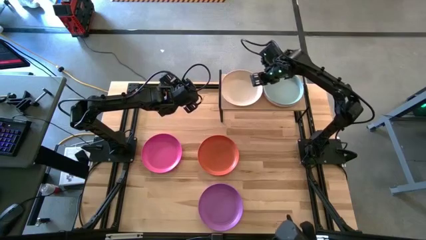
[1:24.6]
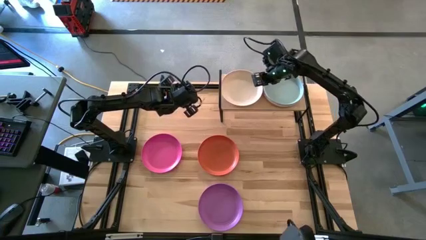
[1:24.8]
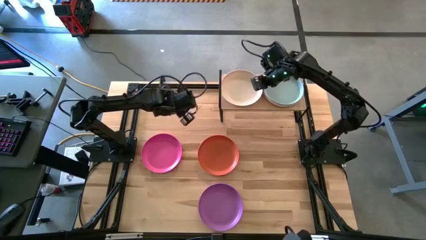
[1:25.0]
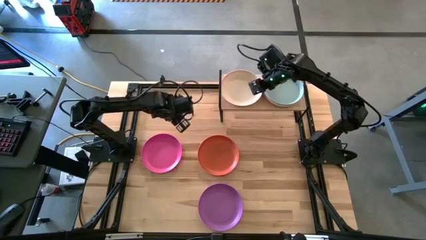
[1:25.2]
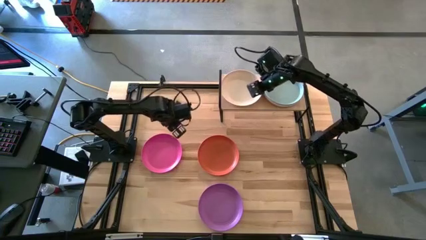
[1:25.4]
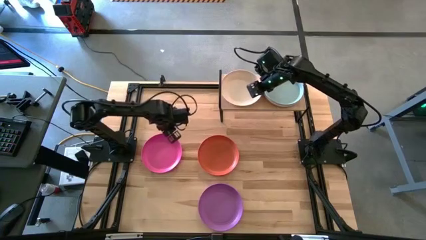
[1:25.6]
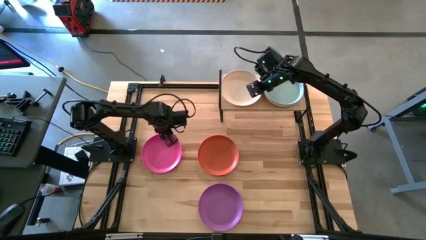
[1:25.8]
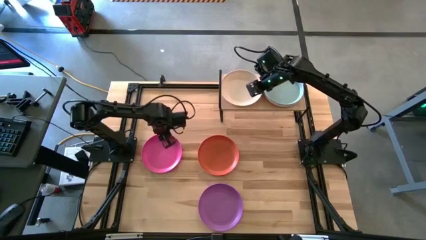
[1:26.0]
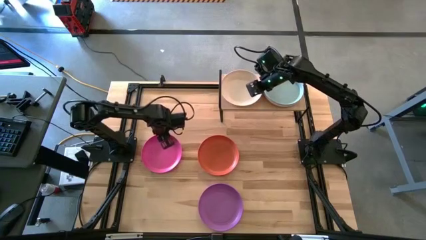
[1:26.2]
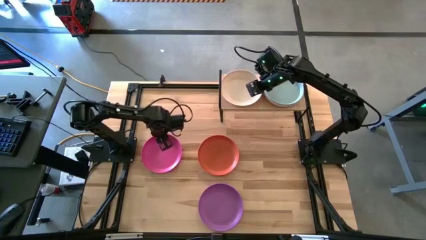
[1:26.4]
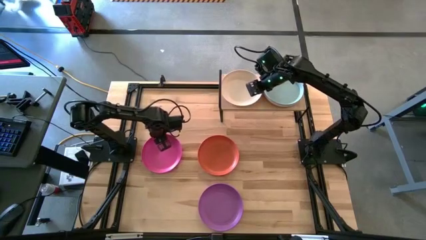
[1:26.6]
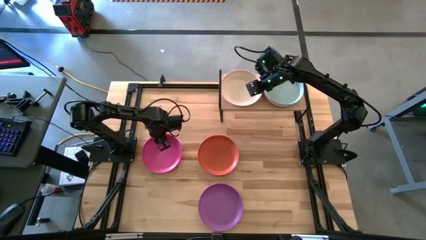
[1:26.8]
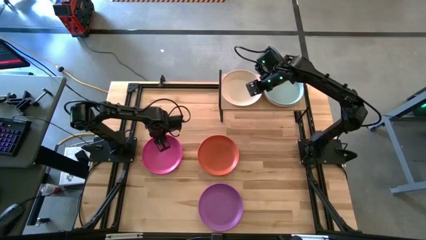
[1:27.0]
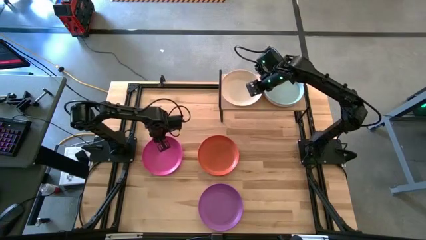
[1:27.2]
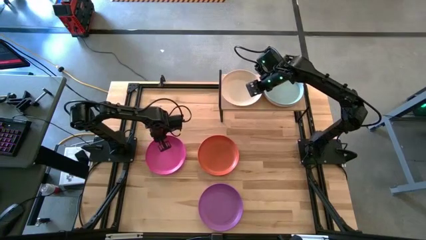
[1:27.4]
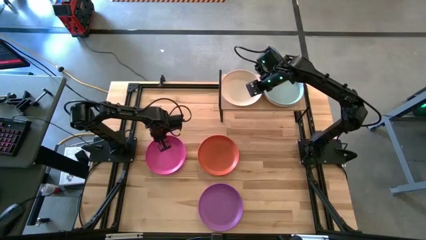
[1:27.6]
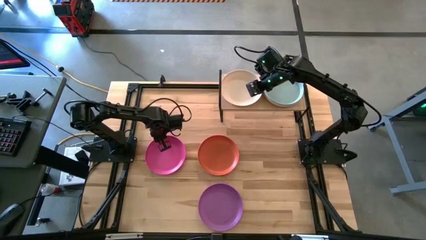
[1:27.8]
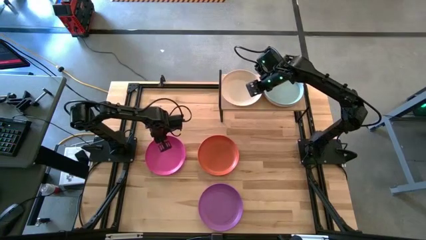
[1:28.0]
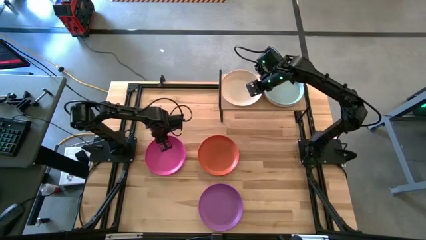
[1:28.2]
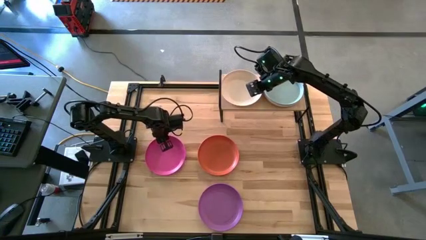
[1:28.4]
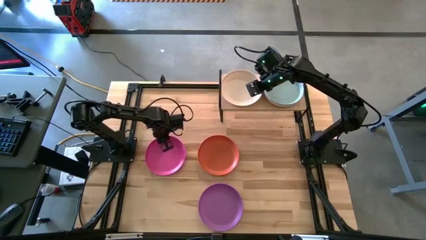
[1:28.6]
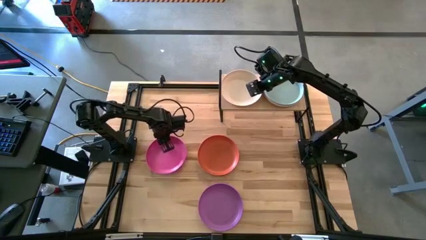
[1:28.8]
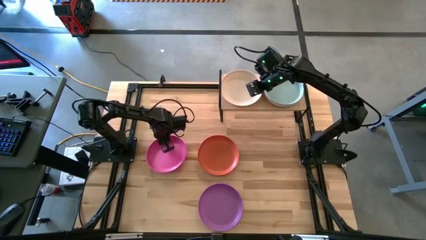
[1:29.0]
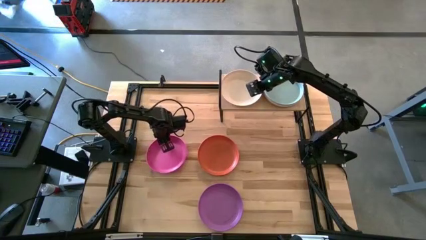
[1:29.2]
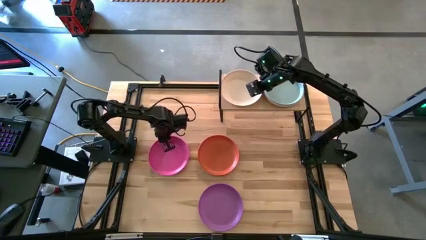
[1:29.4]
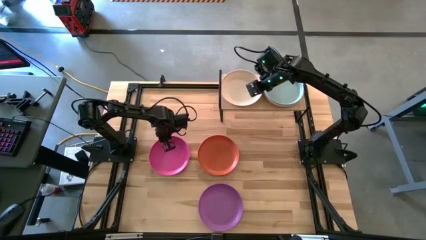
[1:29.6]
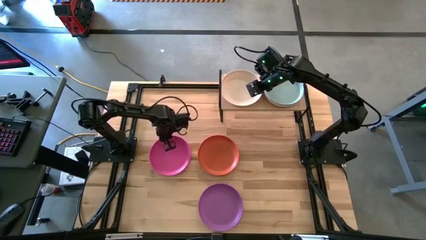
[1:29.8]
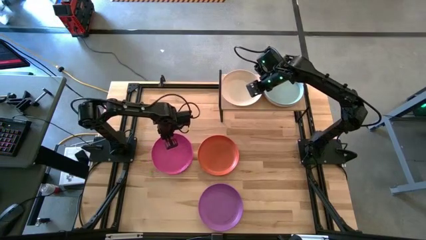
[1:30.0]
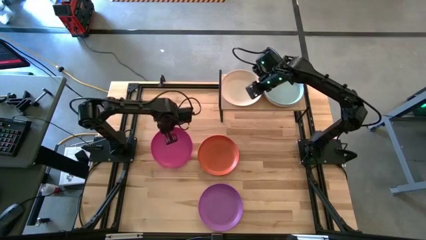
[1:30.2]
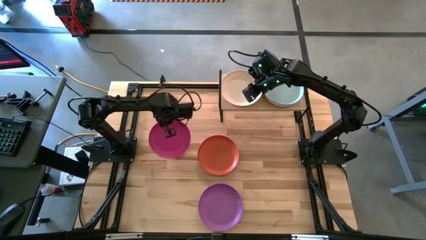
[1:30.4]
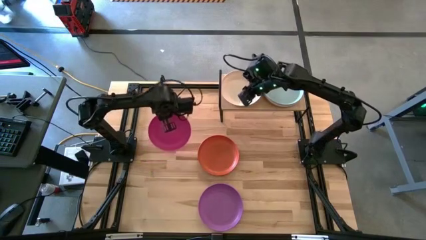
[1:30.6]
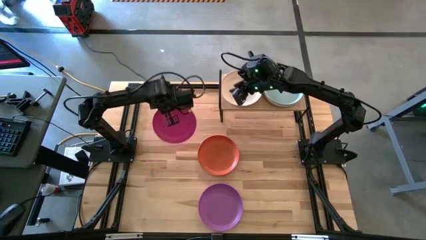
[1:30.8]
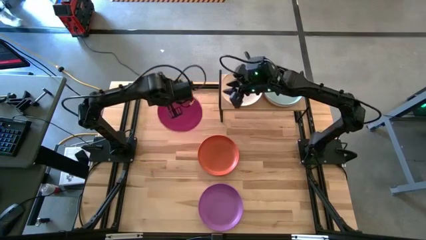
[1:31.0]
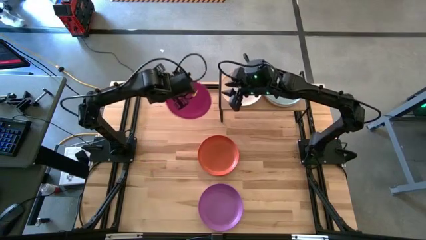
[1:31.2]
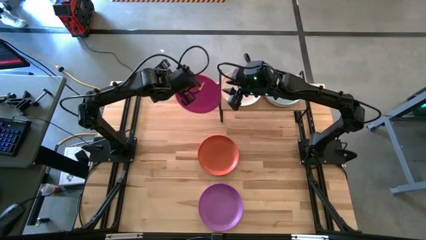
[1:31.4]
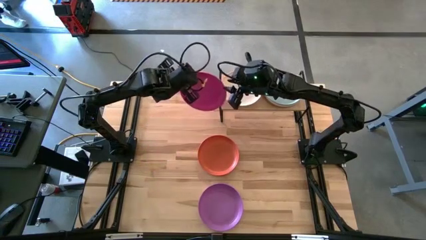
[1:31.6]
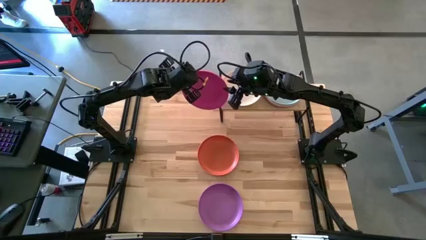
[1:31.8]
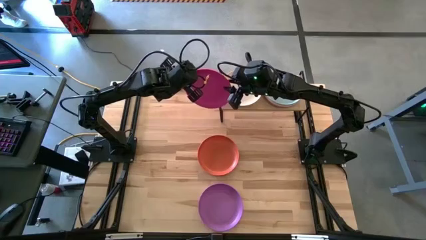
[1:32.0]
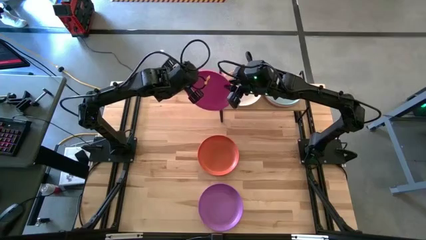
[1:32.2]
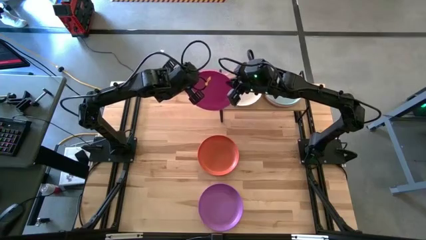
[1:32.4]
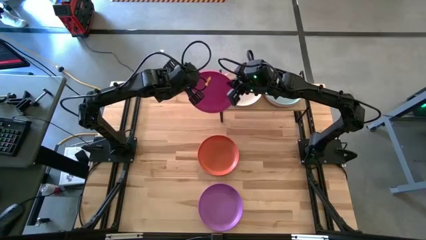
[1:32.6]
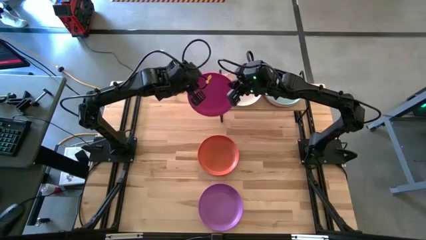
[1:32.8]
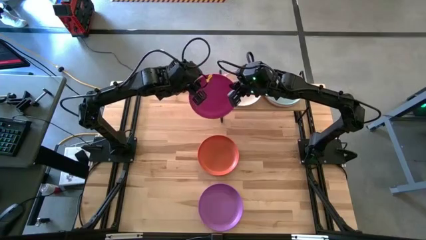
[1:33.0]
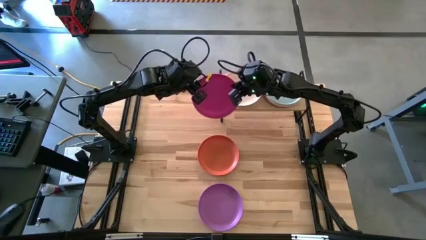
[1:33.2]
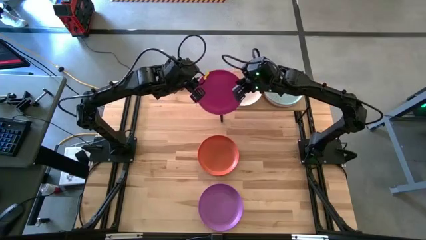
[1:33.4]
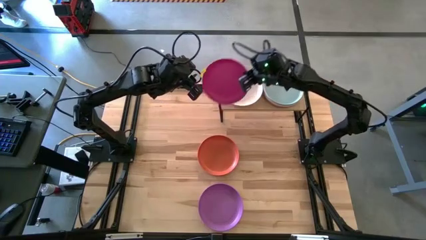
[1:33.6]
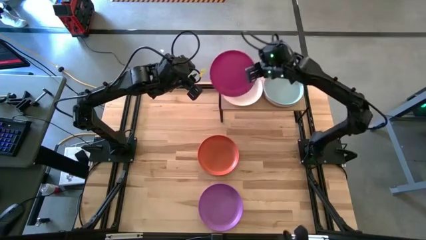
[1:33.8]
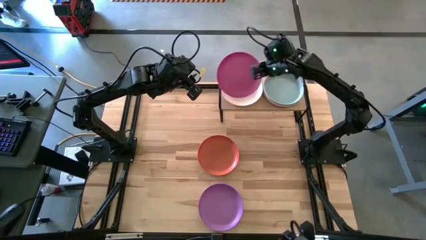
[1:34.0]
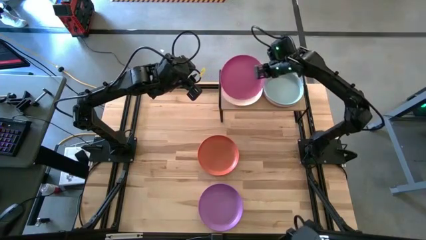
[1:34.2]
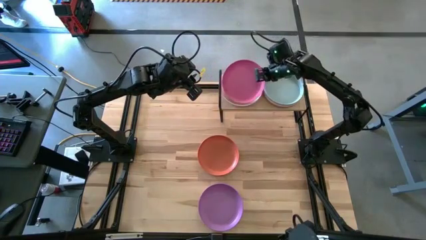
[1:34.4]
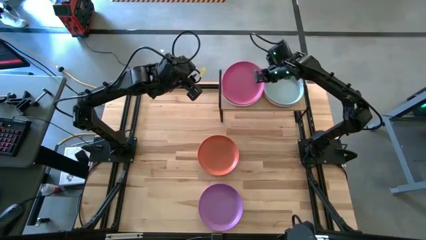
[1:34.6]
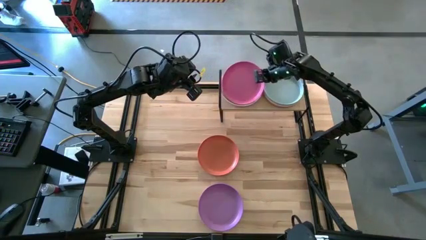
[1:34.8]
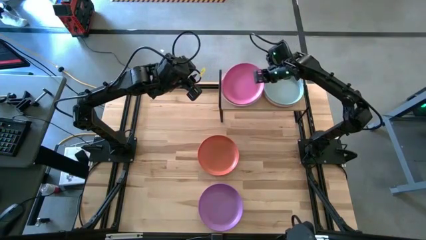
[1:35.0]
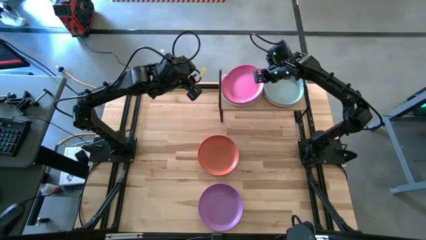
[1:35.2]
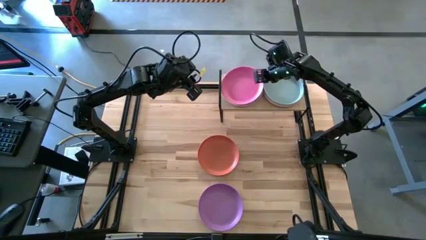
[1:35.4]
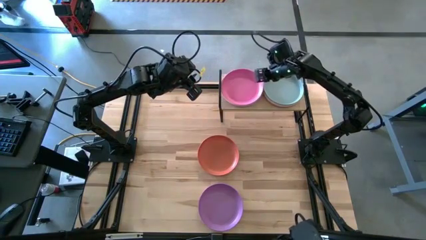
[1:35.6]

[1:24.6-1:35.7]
Task: Place and stack plates onto a shelf
Stack the pink plate on top of the white plate on the shelf

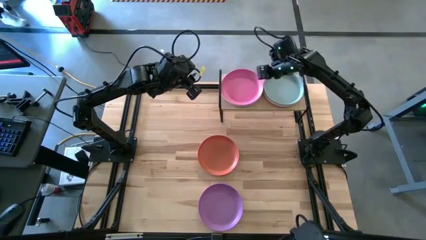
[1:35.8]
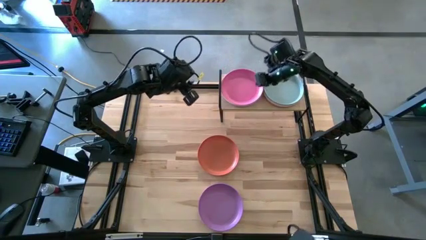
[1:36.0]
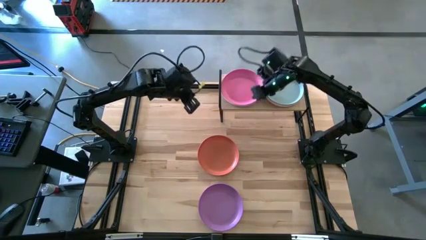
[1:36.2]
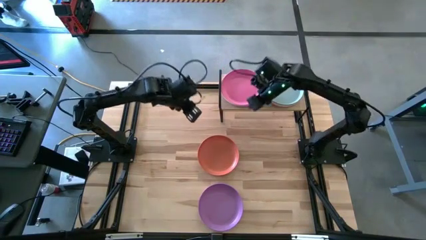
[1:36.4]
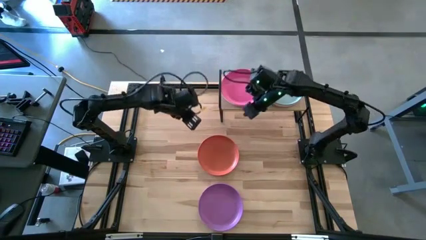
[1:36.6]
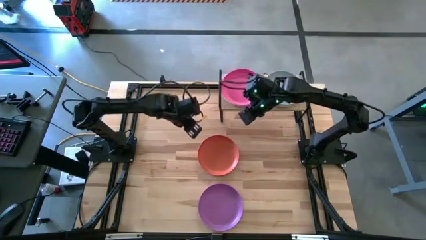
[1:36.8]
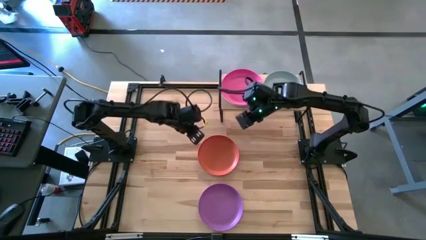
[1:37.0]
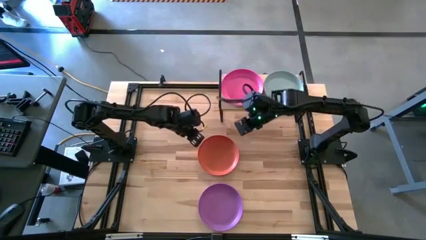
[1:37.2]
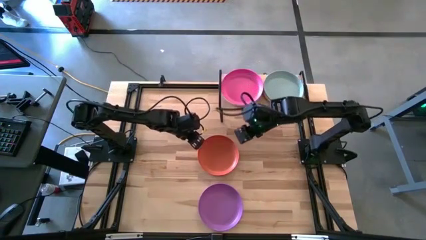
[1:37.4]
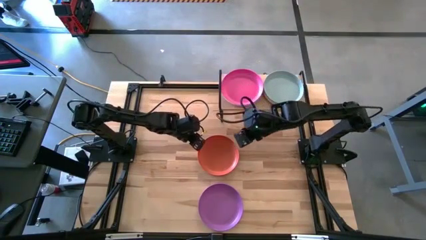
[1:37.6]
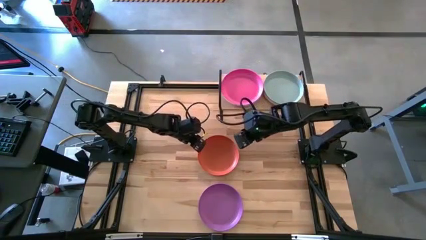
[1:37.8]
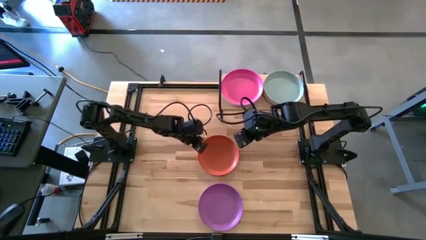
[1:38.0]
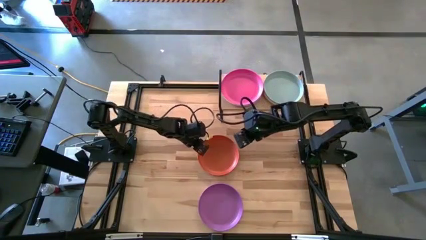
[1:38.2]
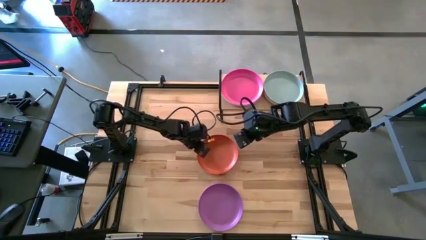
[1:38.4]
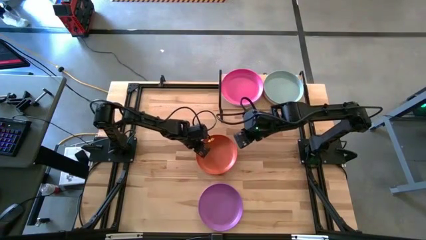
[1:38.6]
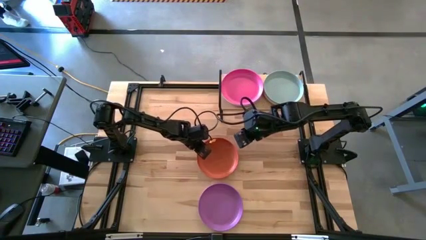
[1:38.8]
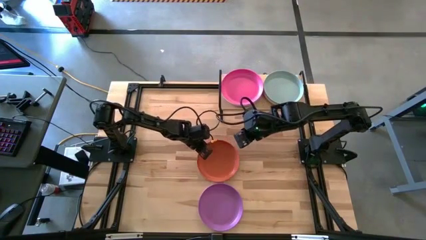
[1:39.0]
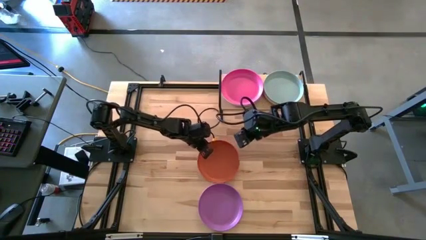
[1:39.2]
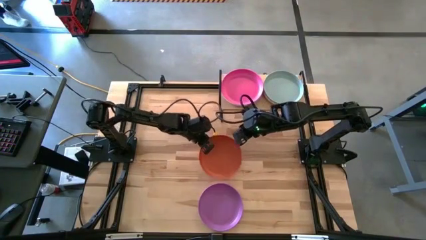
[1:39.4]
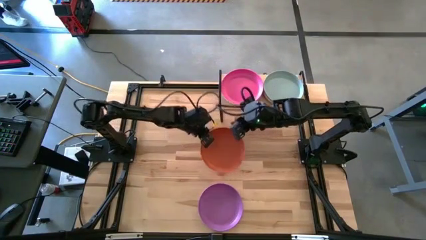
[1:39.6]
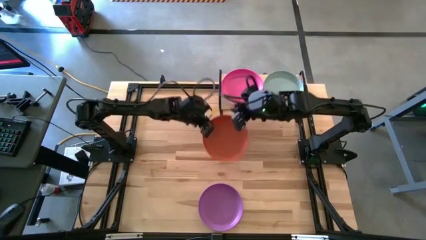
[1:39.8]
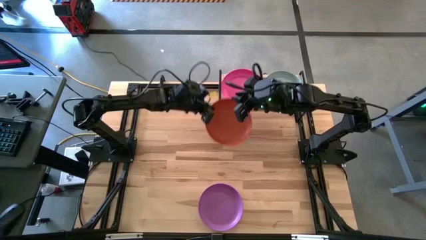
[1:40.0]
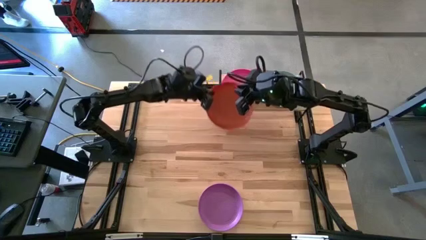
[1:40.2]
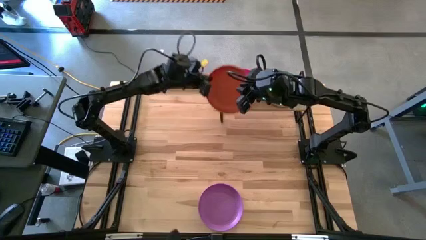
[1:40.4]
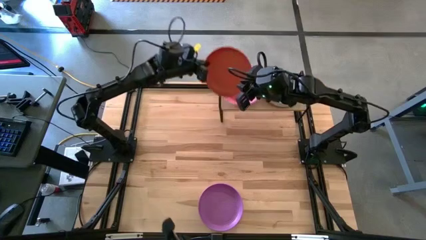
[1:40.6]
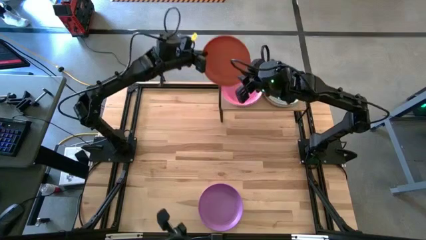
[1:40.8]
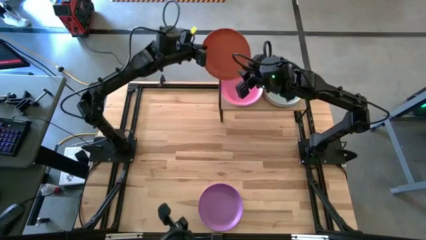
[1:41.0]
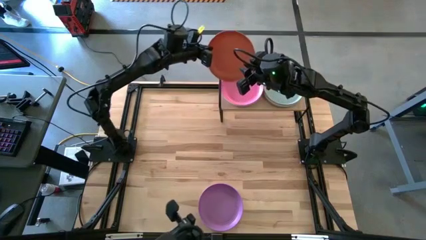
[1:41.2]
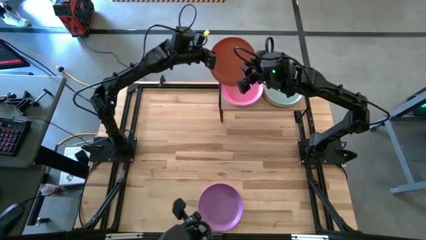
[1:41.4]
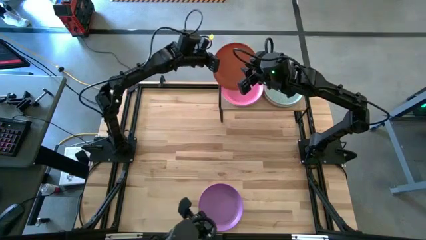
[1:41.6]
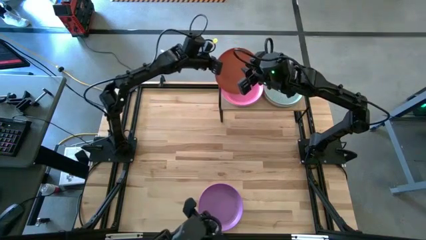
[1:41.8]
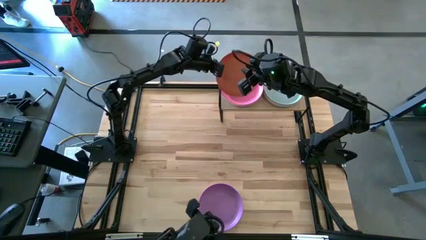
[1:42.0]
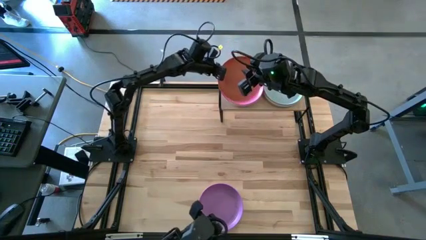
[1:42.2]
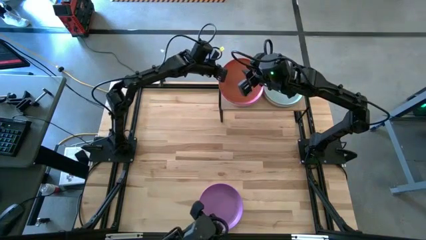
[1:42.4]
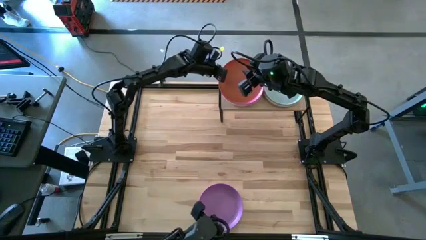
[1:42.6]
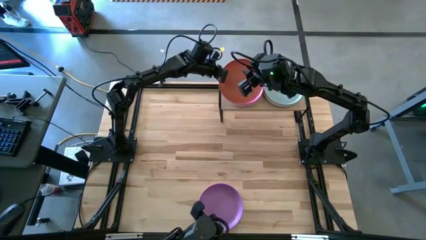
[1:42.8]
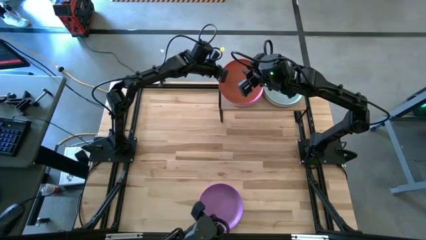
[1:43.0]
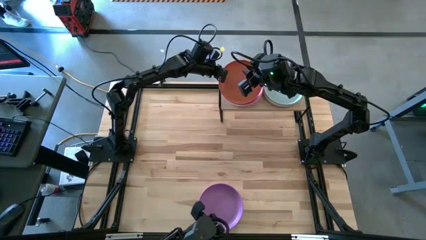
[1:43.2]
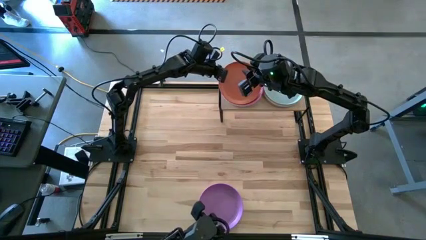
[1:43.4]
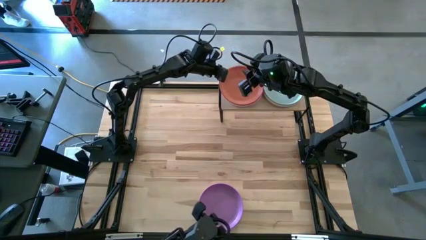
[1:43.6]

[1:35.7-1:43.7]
Stack the orange plate on top of the pink plate on the shelf
